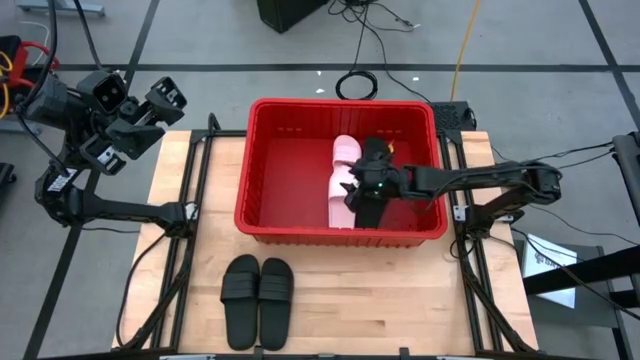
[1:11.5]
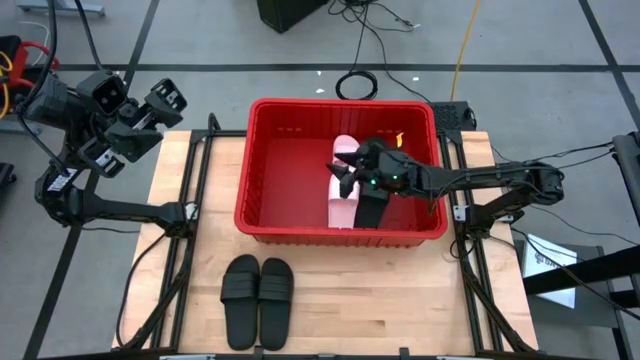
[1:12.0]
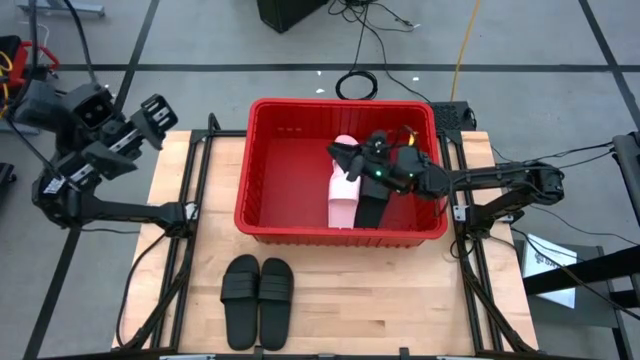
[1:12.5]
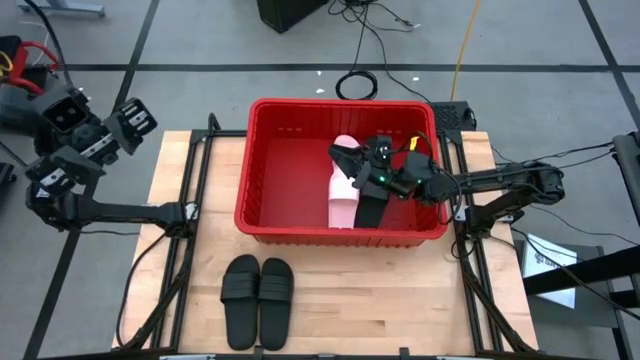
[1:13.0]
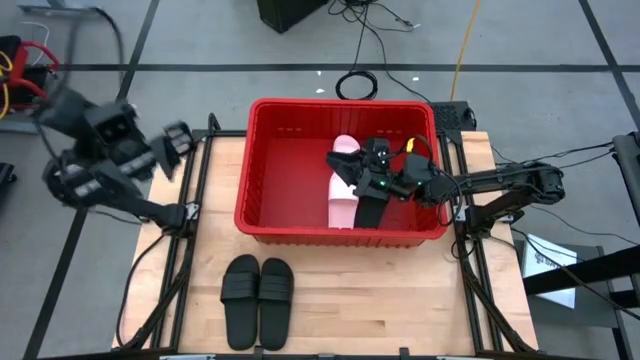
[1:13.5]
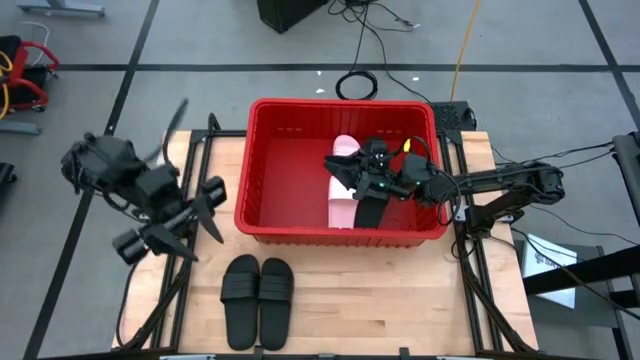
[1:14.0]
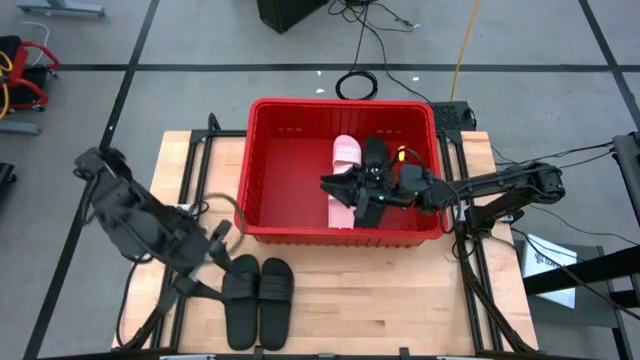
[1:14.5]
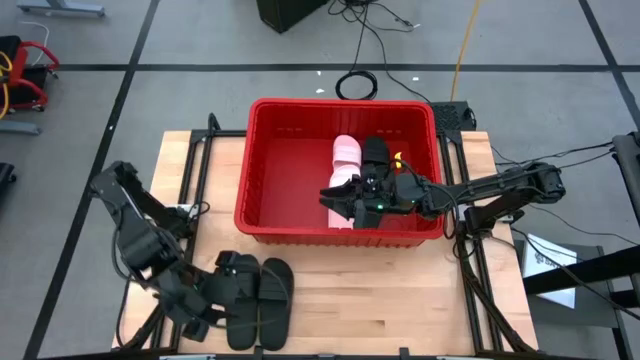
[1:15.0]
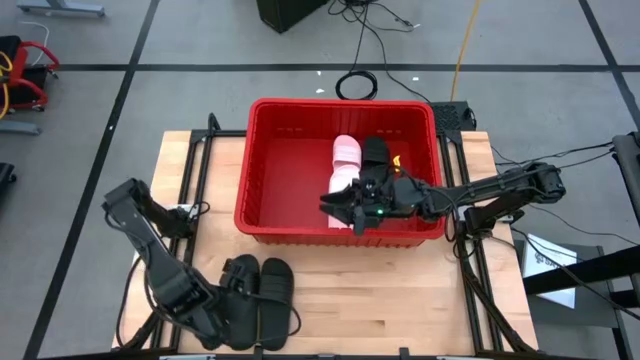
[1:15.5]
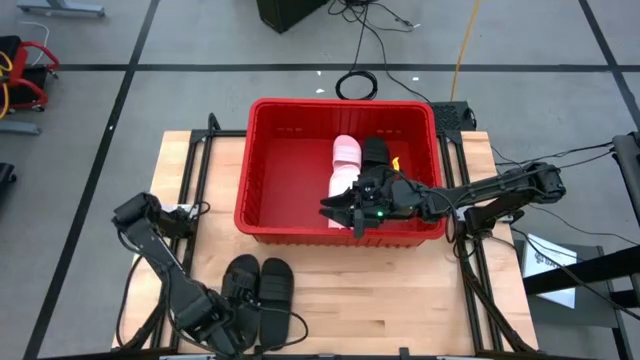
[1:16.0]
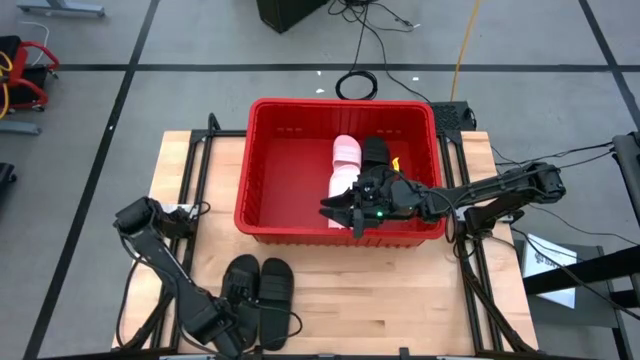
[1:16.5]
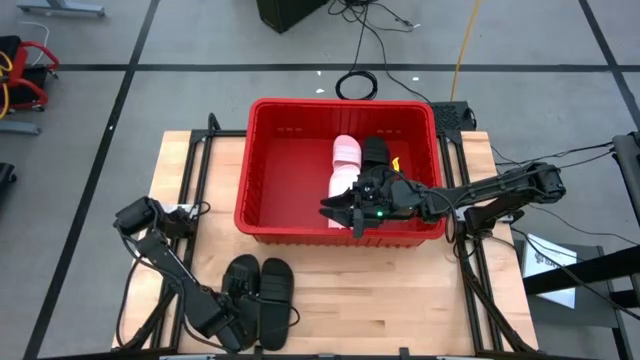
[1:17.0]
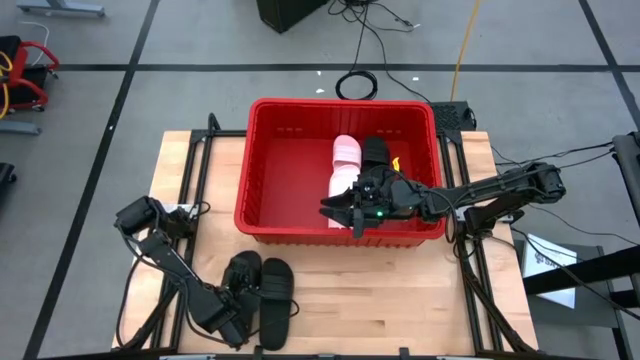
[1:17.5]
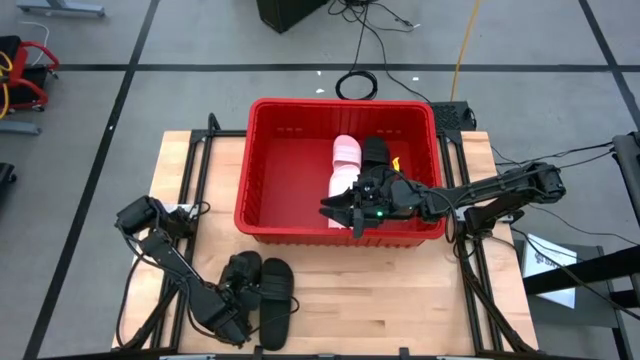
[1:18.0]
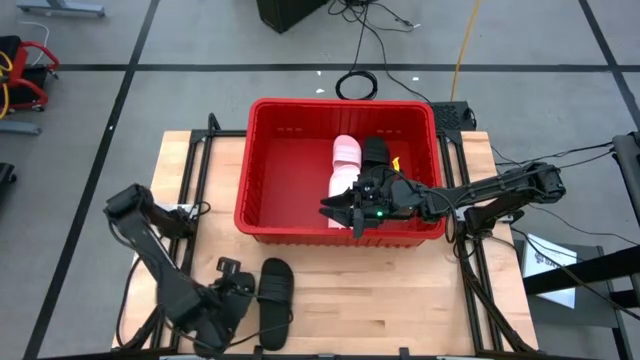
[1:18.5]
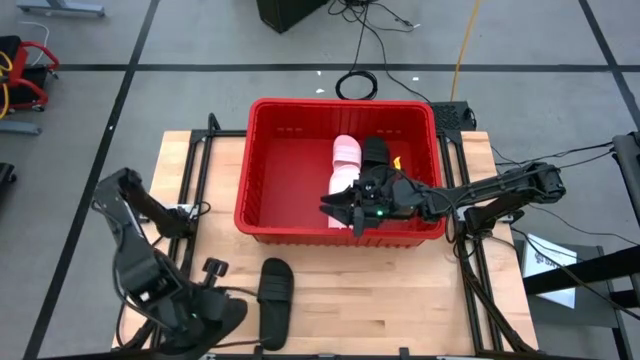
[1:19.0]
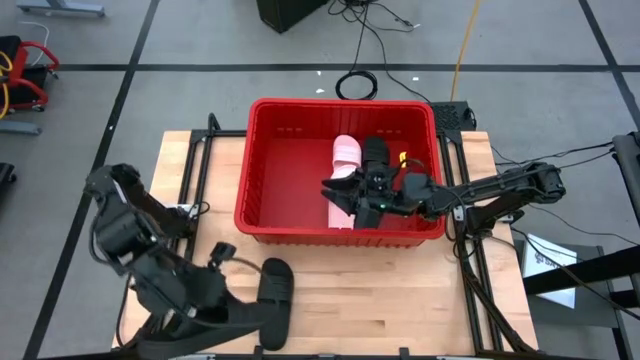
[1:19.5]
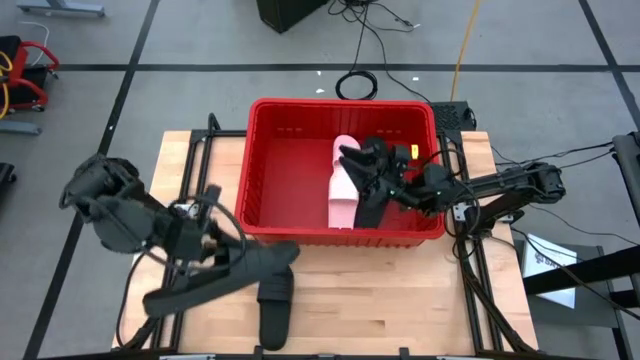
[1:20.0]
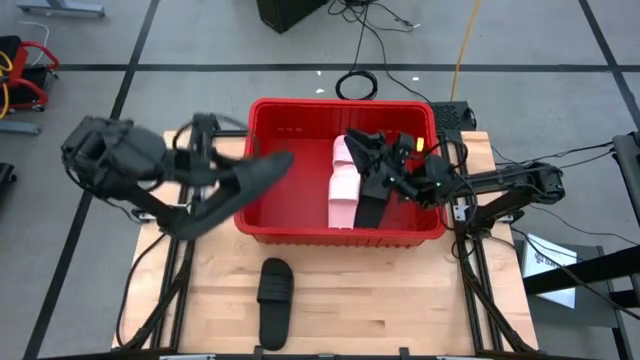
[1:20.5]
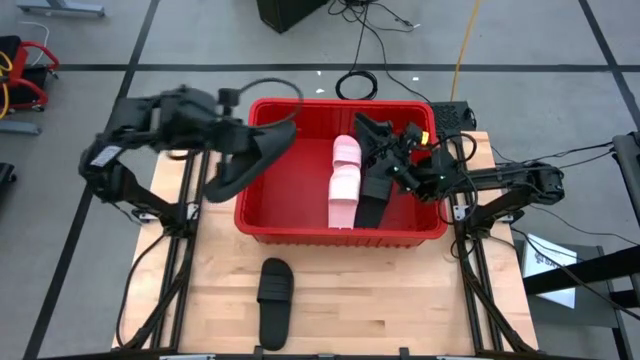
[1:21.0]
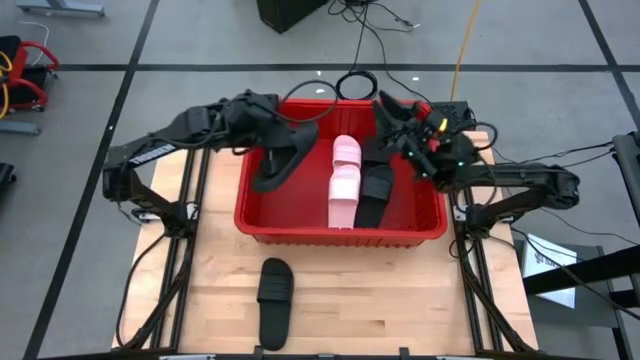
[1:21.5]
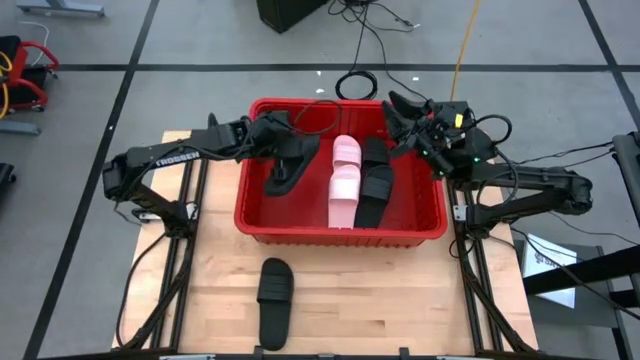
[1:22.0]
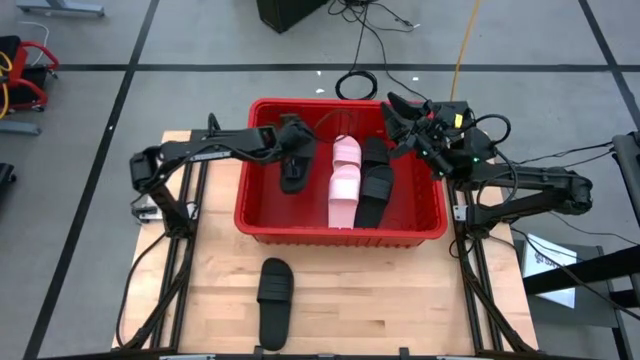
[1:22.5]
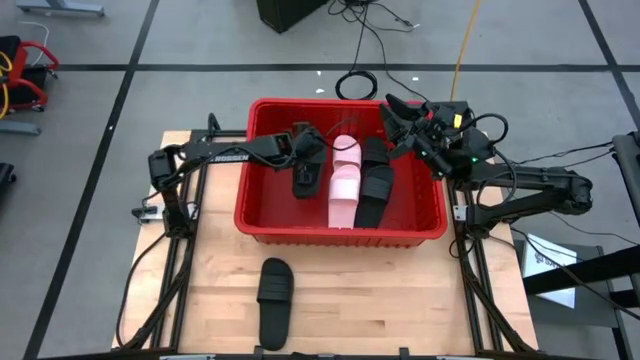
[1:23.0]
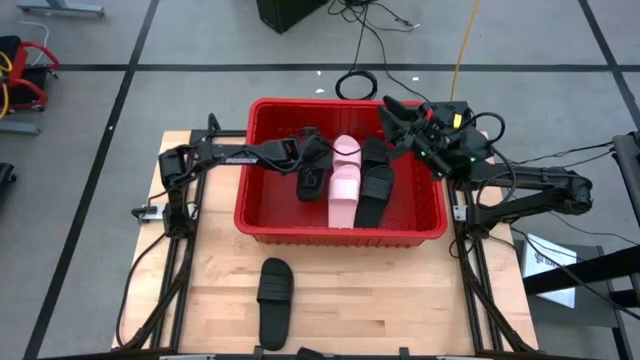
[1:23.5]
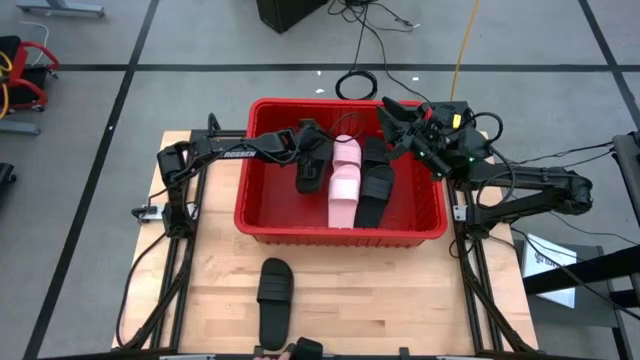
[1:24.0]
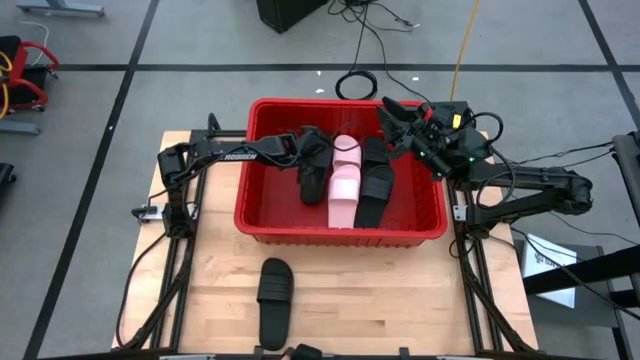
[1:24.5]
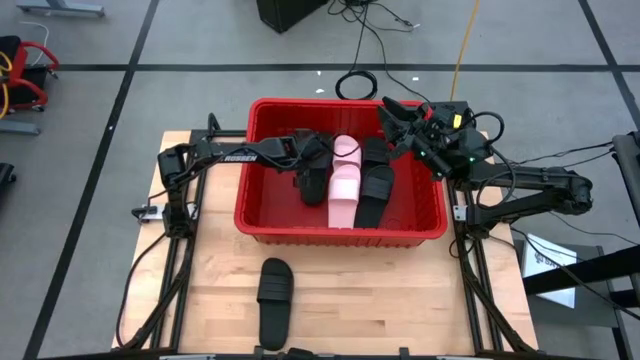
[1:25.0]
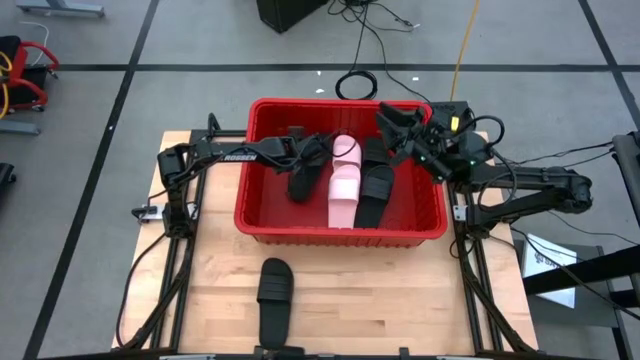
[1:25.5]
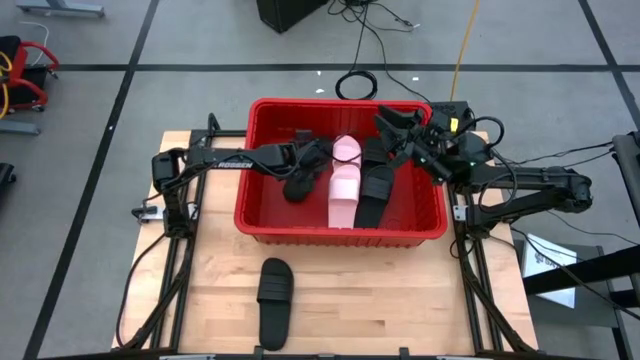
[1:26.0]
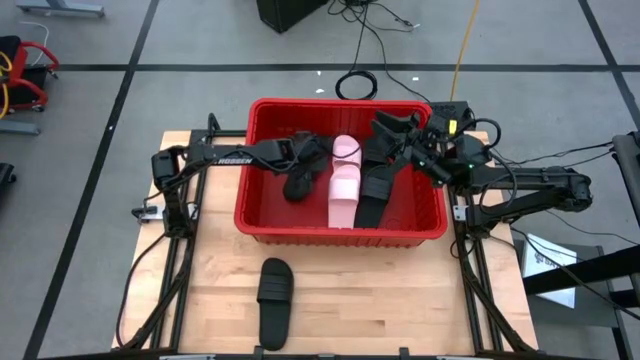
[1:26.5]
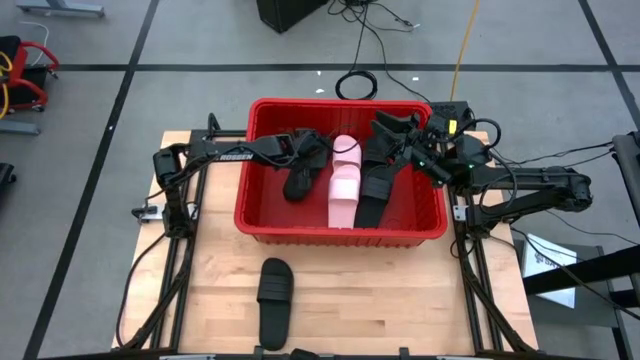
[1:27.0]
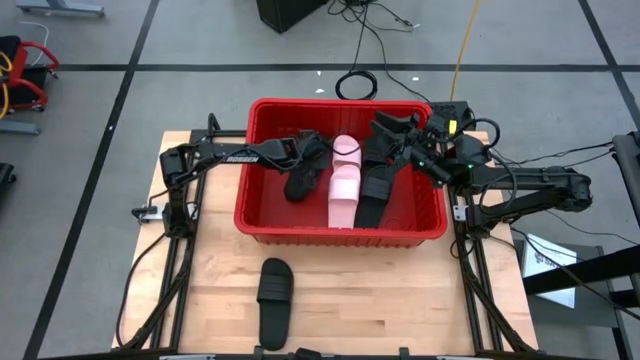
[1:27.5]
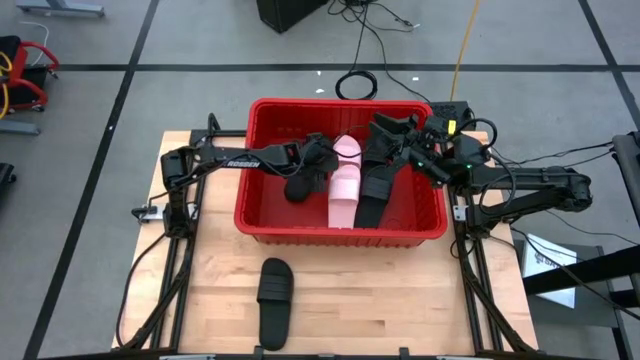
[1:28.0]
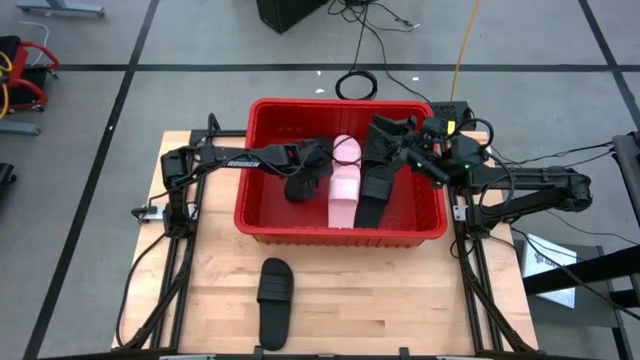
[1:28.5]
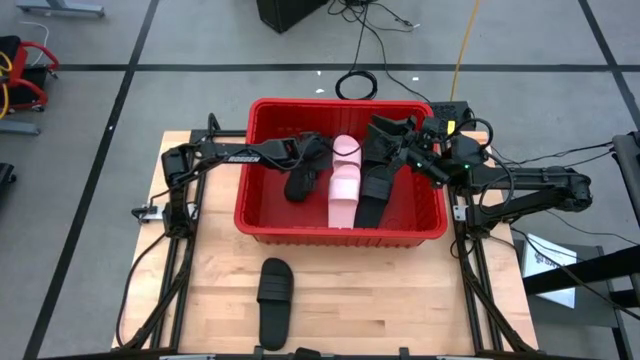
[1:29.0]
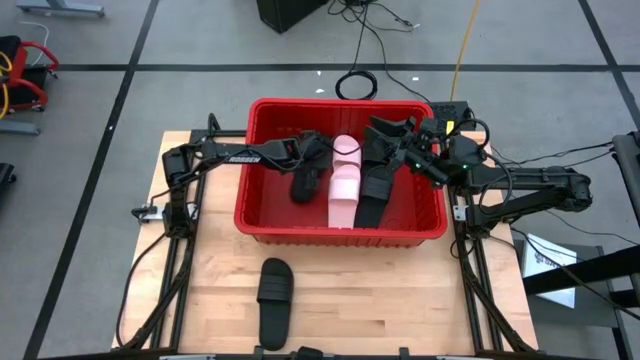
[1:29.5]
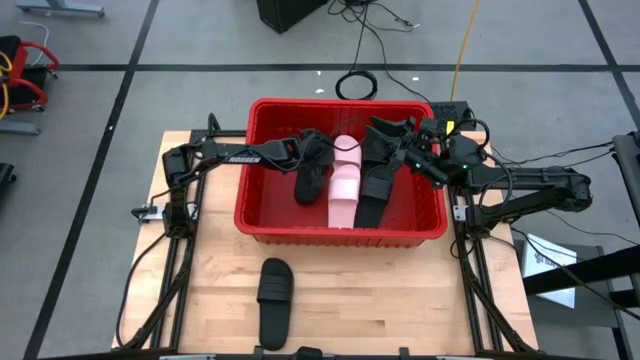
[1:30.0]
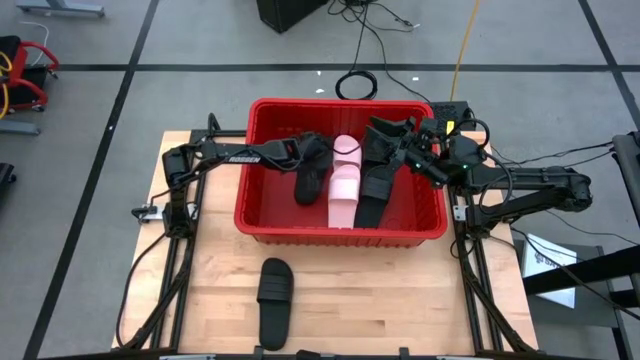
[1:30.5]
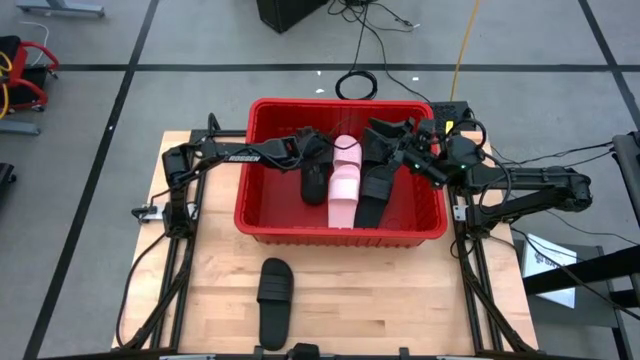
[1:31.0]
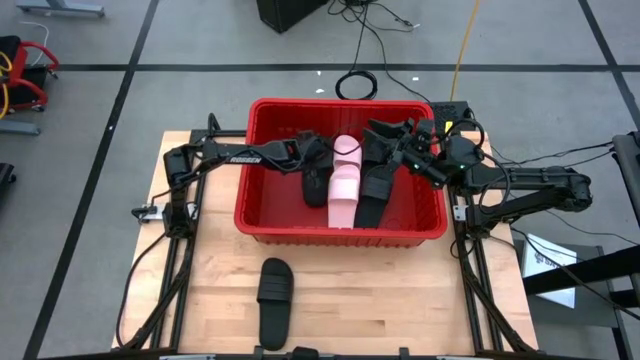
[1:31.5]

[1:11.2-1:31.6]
Task: Pick and place slides into bin
Put the black slide into the red bin
